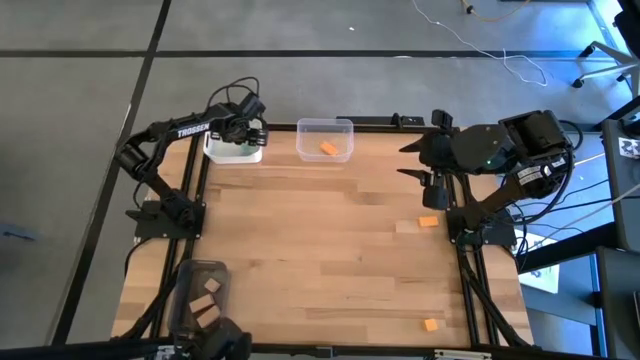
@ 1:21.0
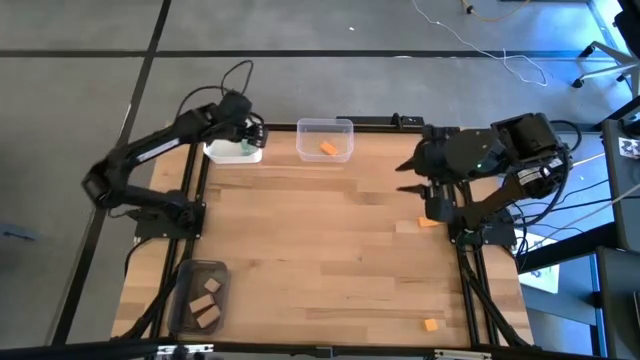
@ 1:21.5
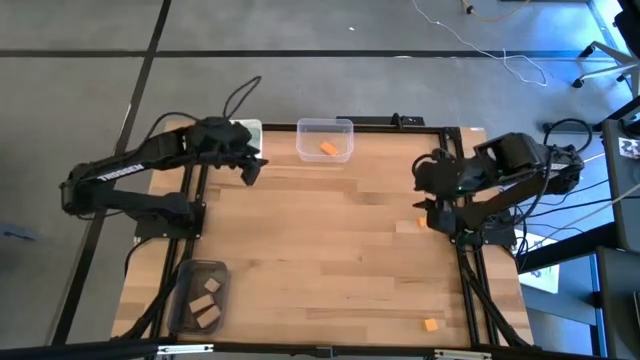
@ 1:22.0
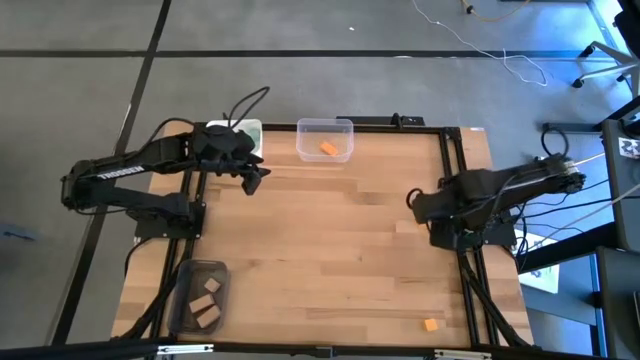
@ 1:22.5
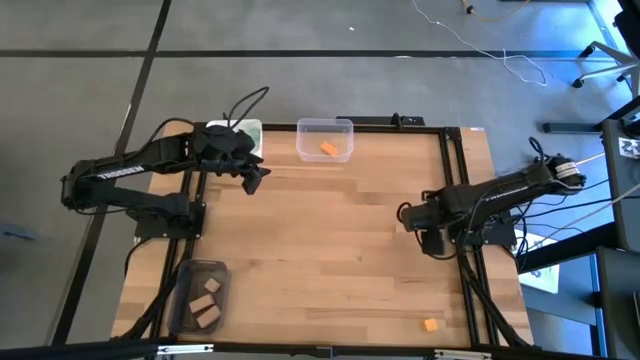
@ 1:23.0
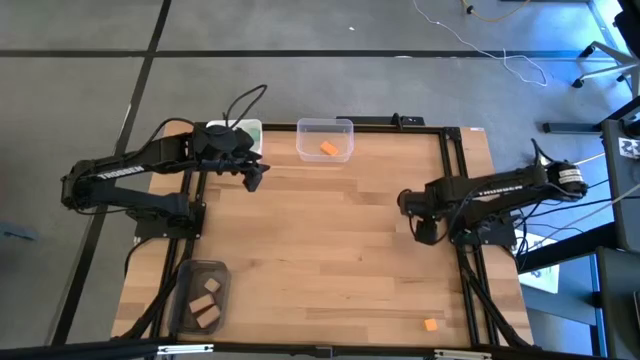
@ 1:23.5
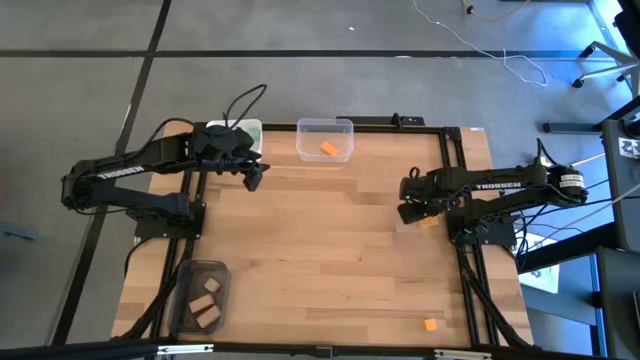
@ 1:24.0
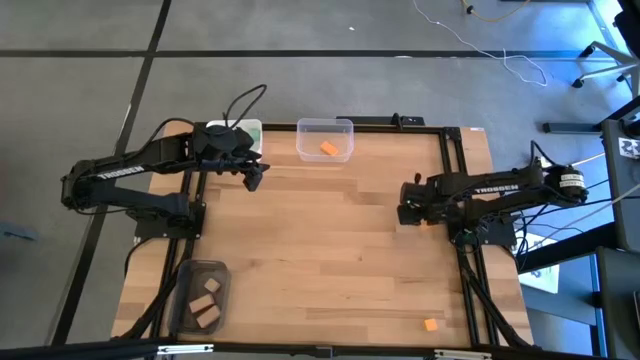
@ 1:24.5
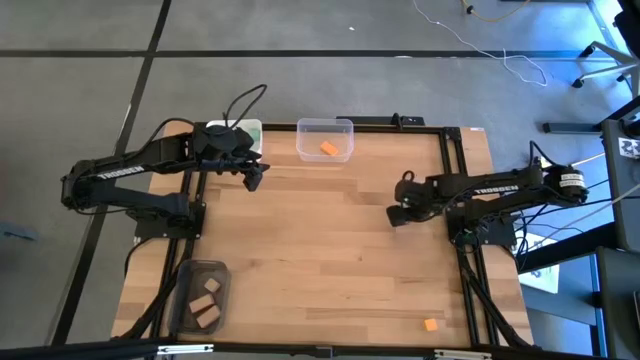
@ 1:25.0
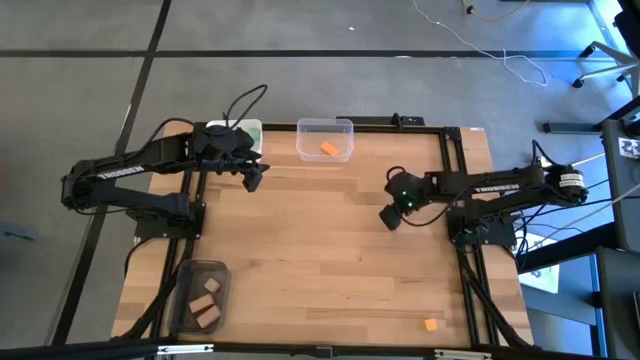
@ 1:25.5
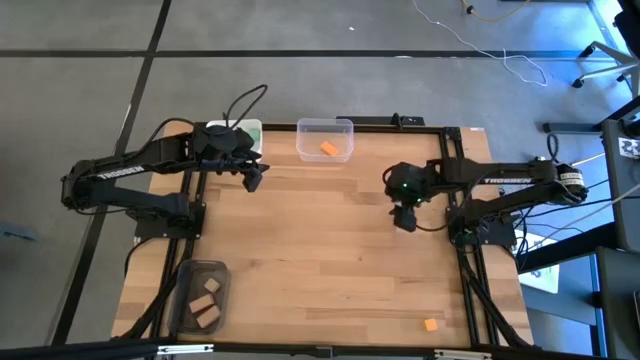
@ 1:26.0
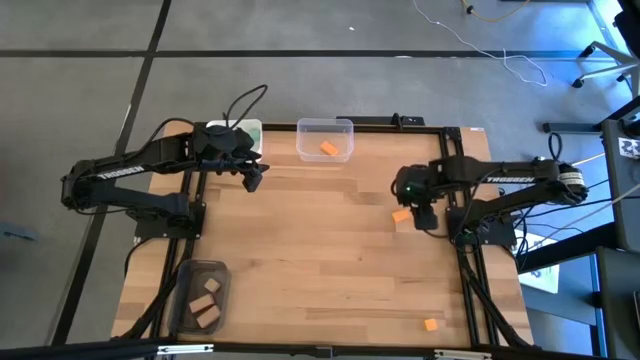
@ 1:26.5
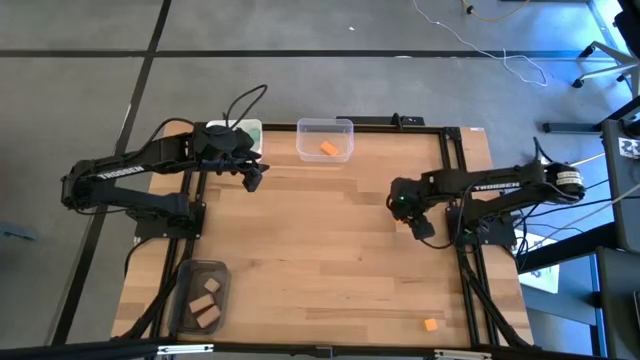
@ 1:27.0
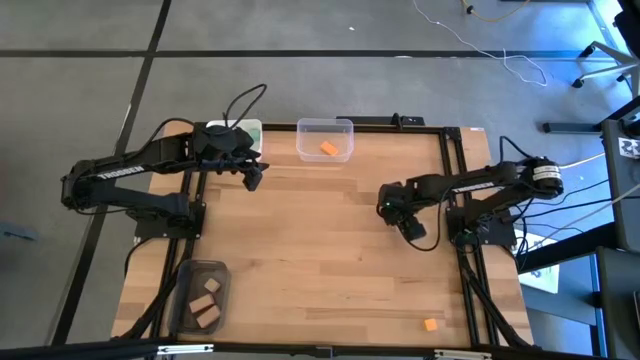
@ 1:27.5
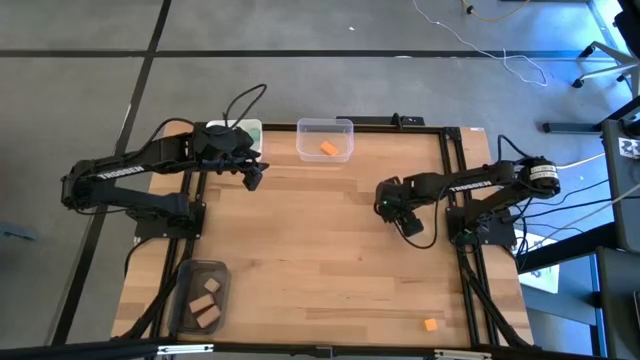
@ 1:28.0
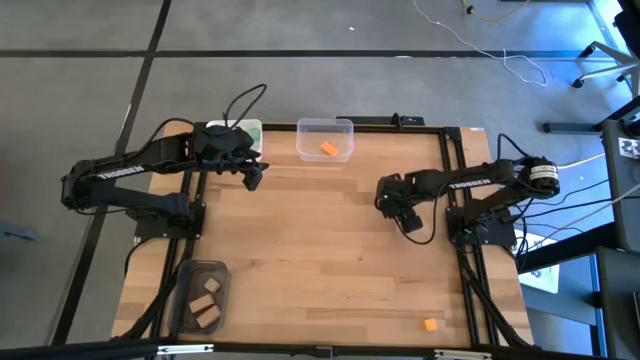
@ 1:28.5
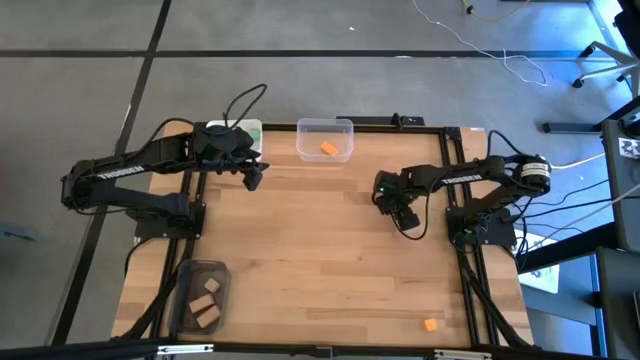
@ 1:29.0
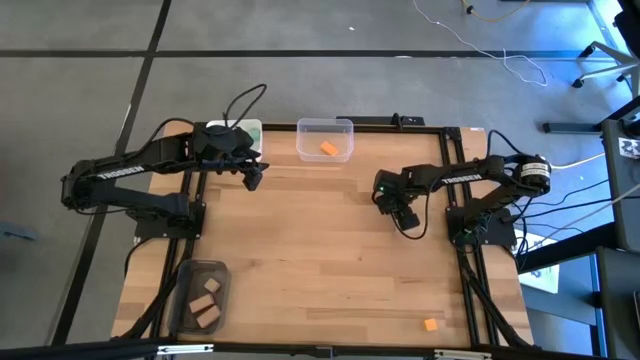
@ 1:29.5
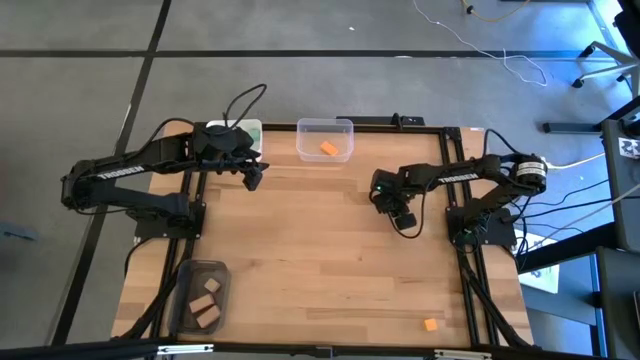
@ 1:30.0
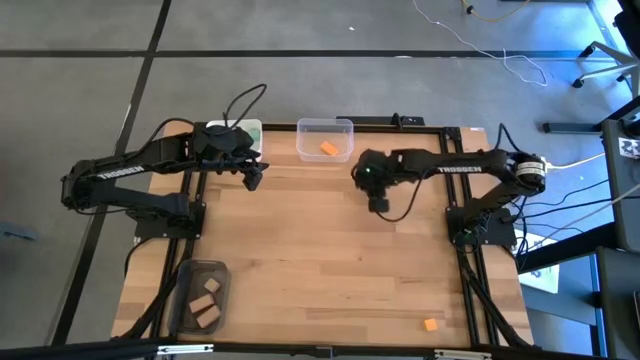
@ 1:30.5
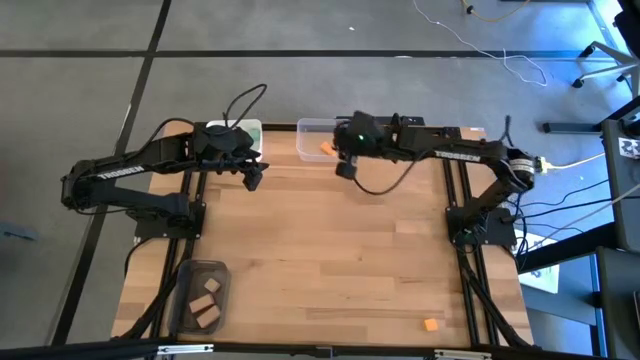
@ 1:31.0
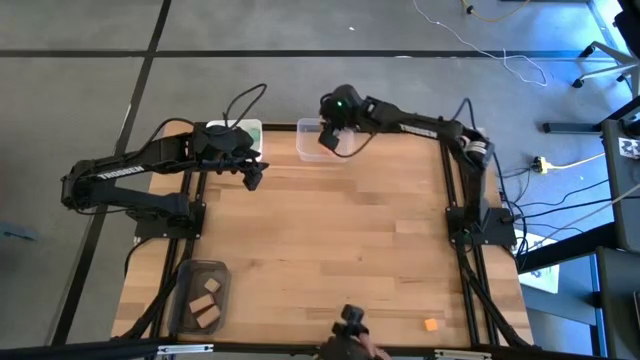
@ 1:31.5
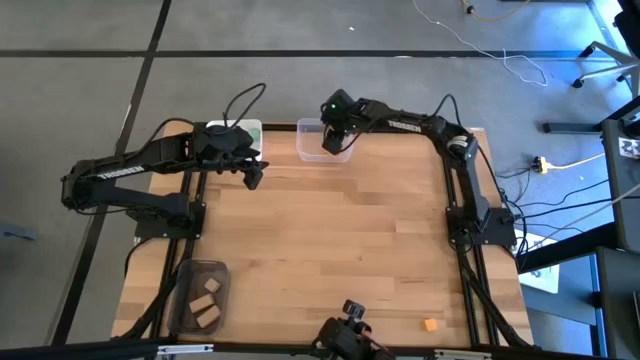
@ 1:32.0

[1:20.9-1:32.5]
Task: Sort & place blocks by color
Put the top orange block into the transparent bin

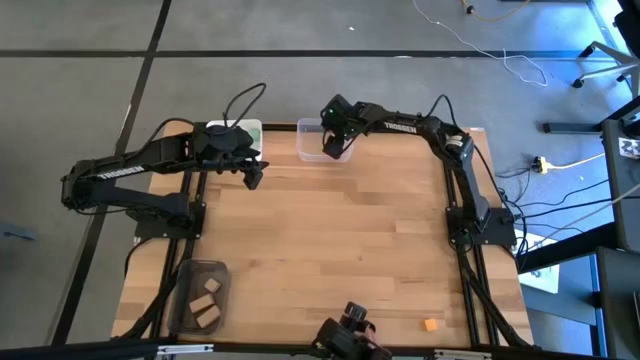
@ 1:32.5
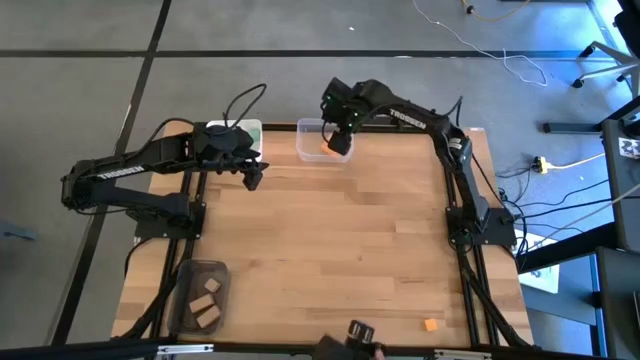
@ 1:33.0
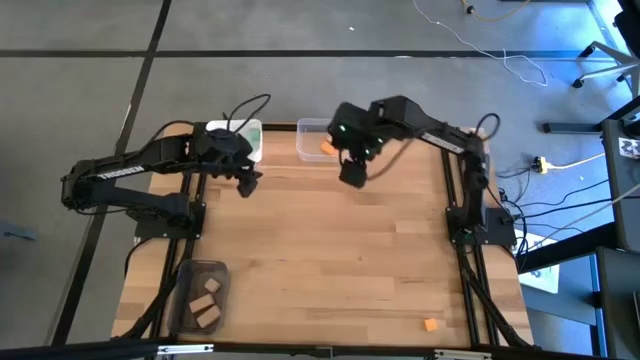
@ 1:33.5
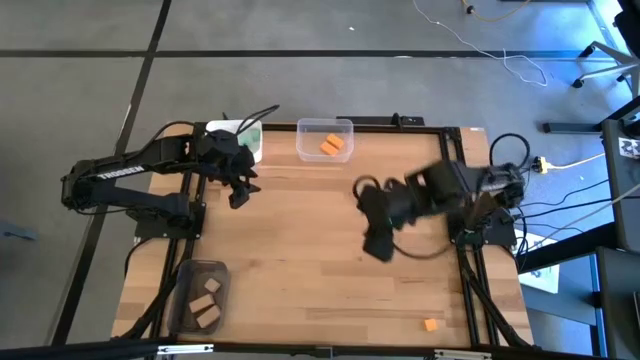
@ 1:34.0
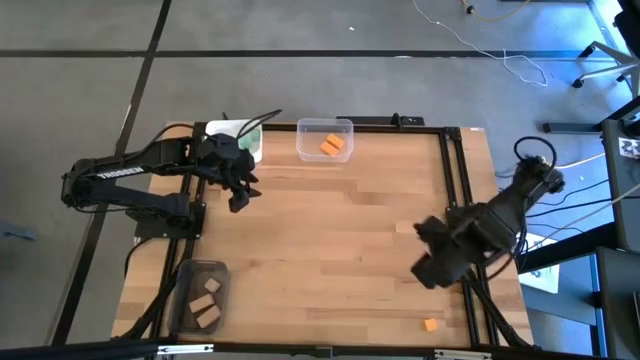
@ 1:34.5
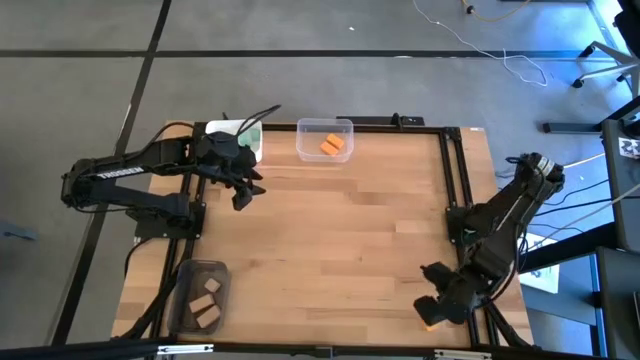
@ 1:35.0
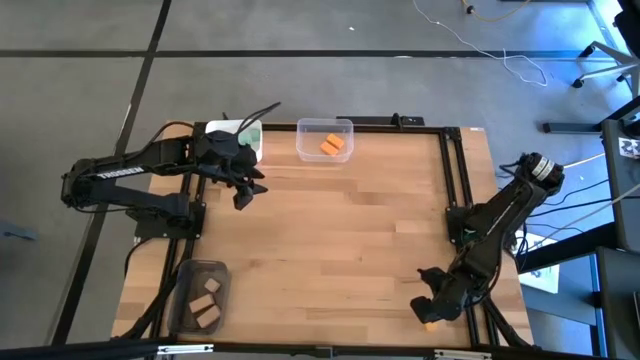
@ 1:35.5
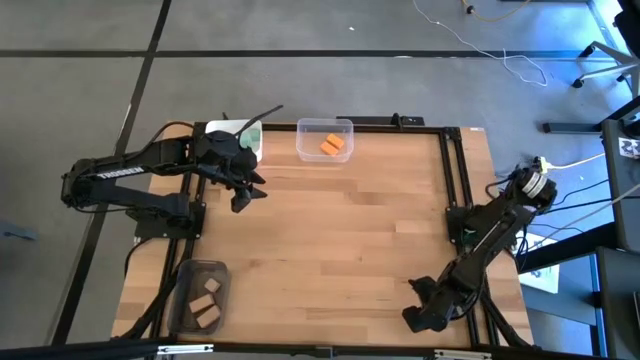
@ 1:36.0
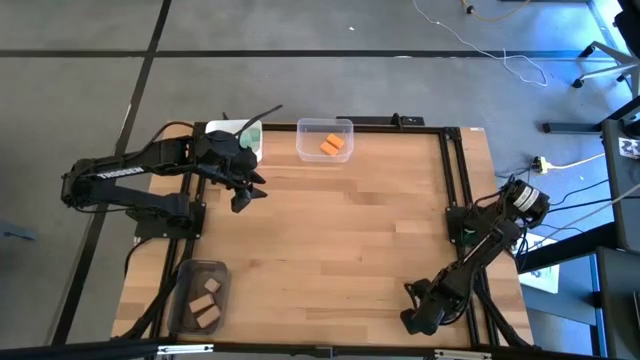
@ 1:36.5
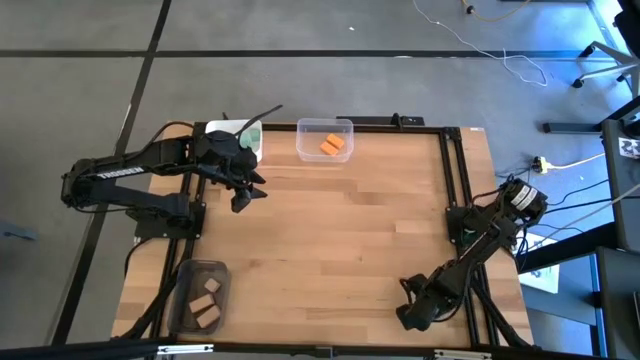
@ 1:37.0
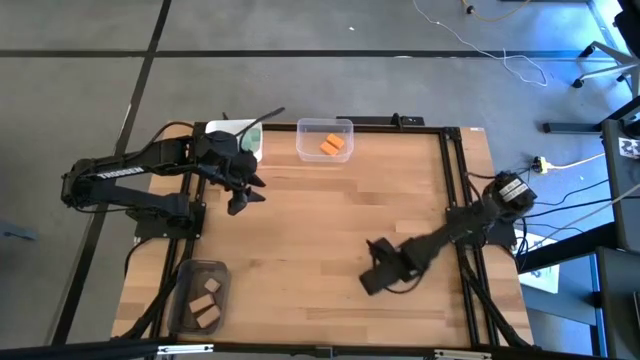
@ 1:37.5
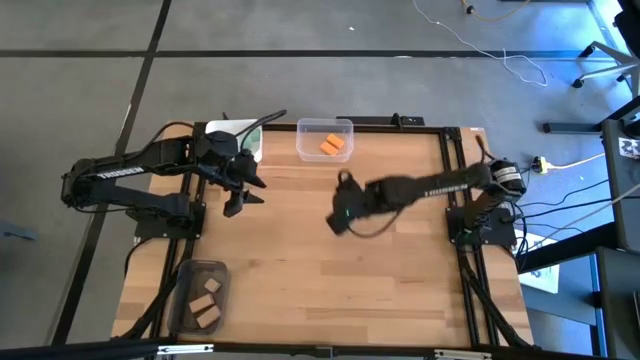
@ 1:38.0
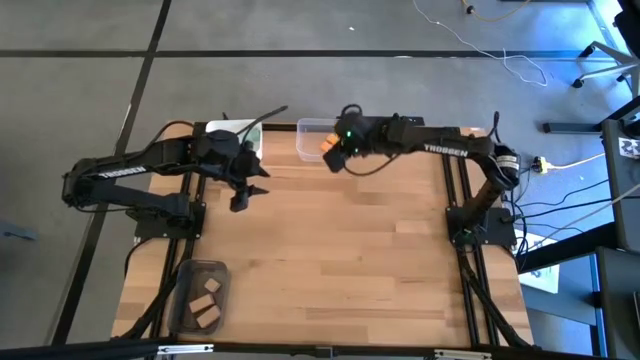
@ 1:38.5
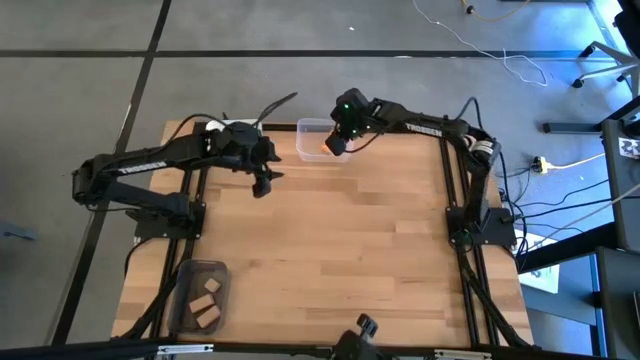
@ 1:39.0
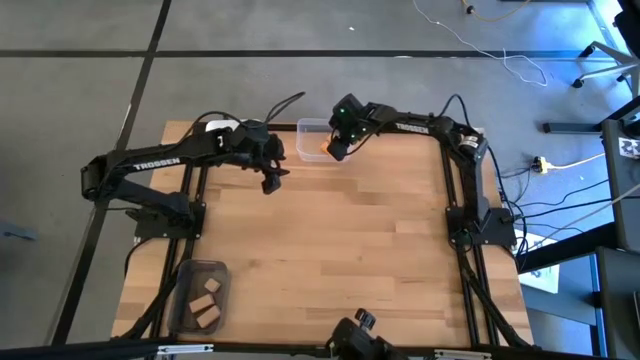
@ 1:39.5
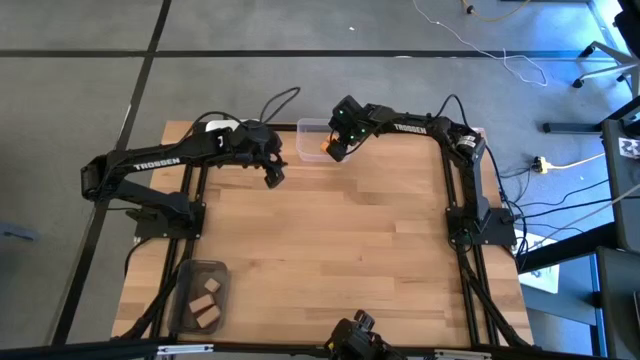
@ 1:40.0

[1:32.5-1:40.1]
Put the orange block into the transparent bin

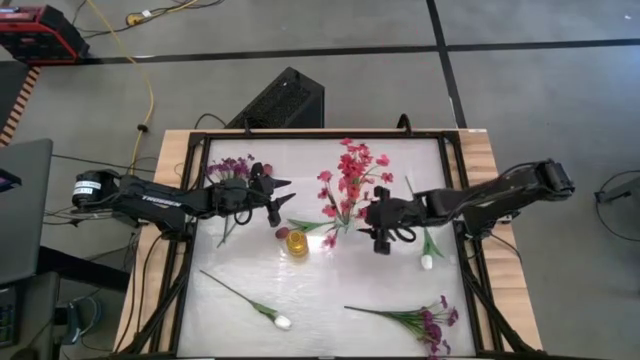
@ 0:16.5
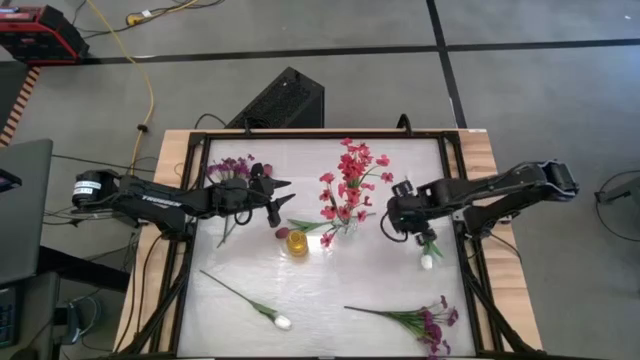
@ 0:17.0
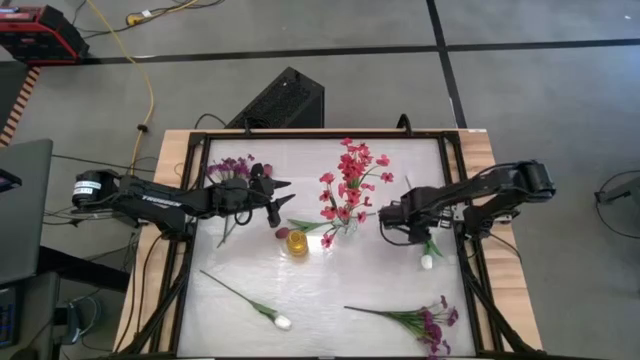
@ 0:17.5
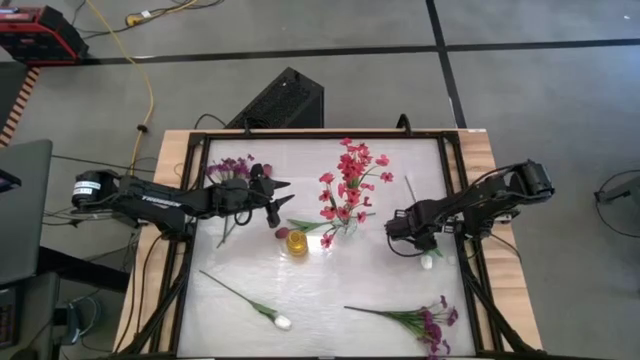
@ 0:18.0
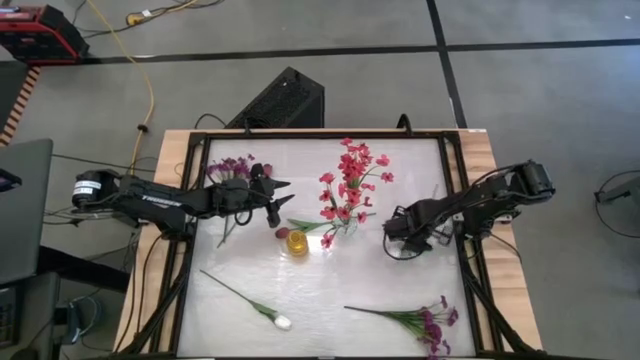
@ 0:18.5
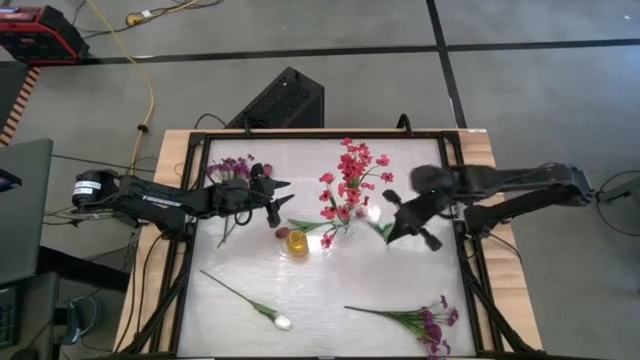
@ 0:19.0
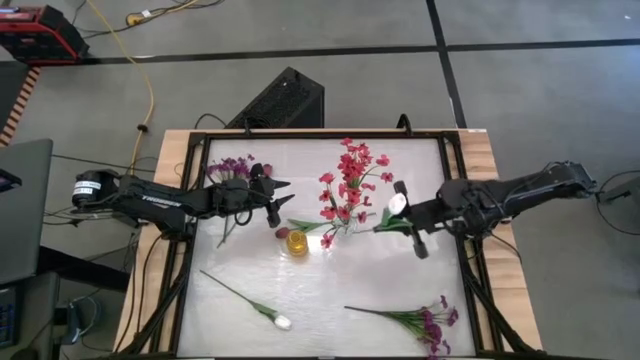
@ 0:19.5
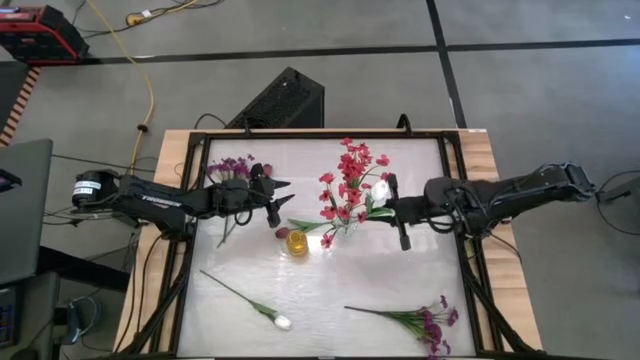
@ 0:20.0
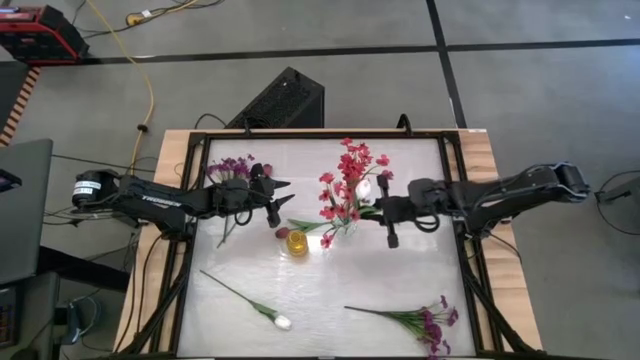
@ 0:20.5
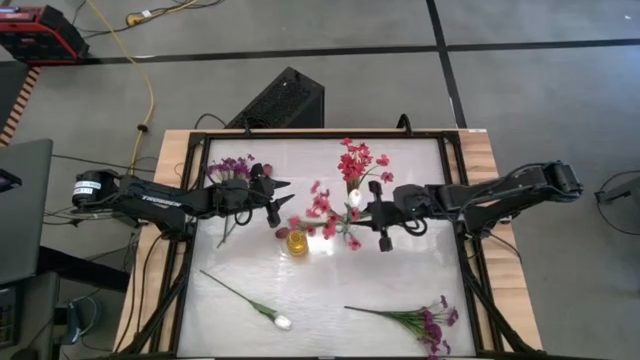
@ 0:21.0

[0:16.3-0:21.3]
Task: Sort flowers into vase by color
Put the top white tulip into the transparent vase
